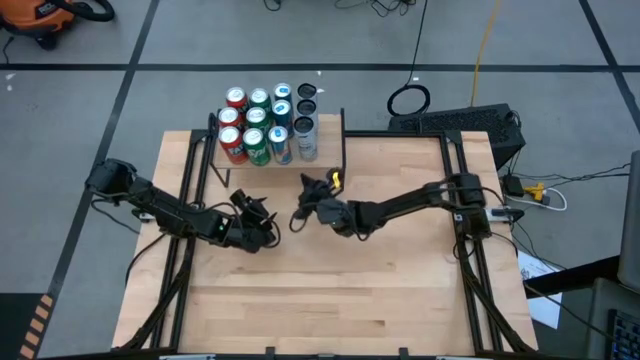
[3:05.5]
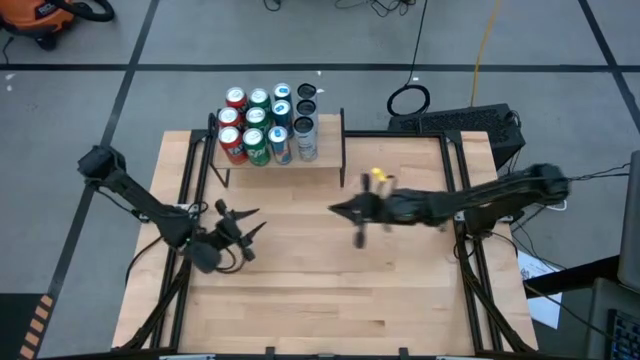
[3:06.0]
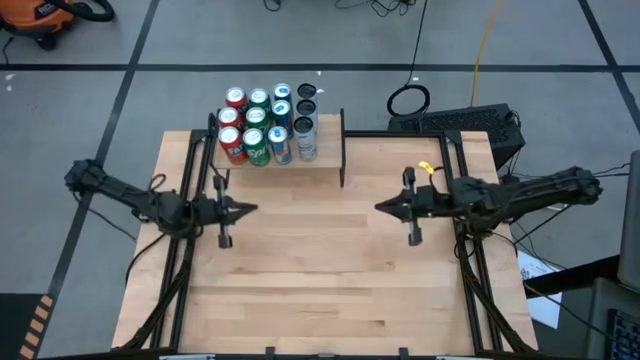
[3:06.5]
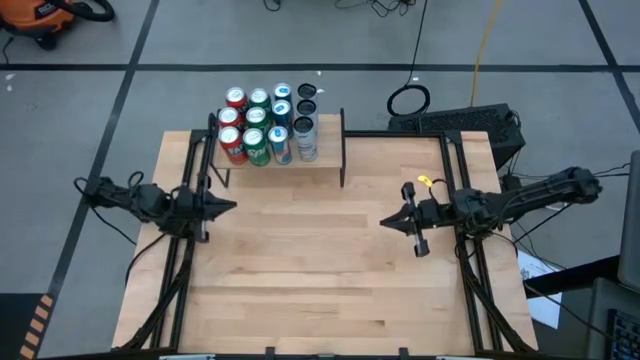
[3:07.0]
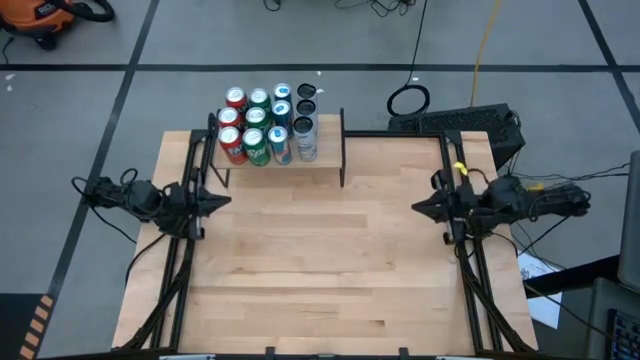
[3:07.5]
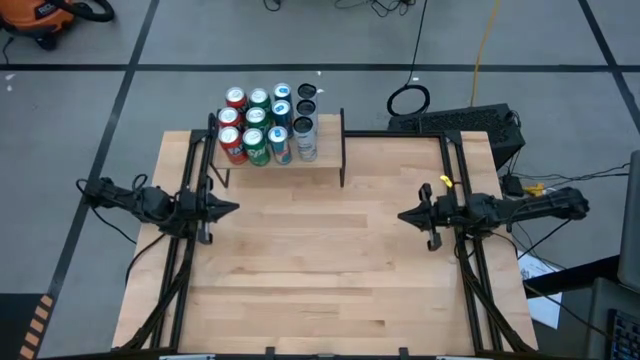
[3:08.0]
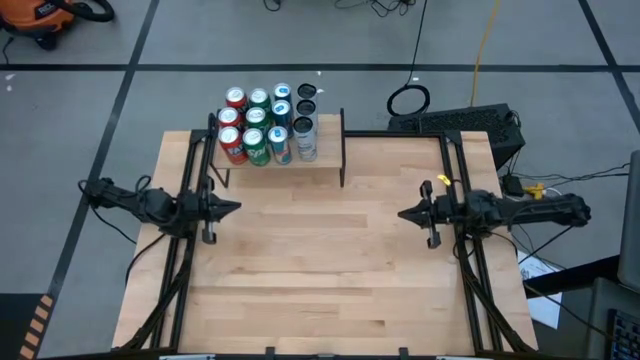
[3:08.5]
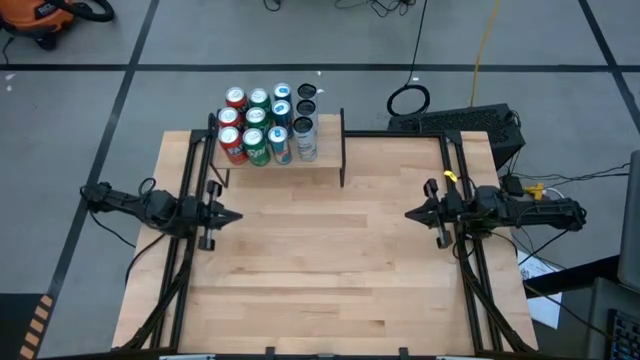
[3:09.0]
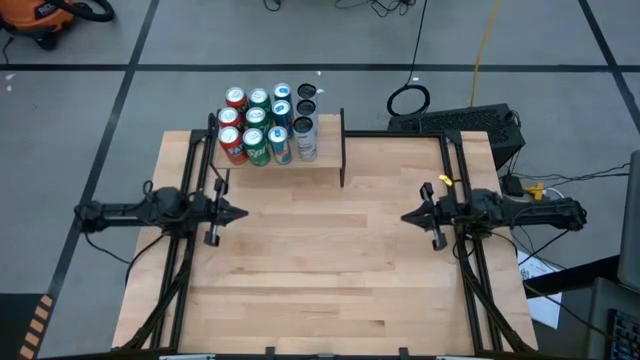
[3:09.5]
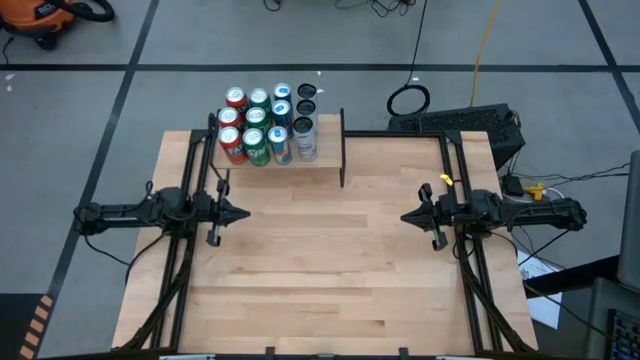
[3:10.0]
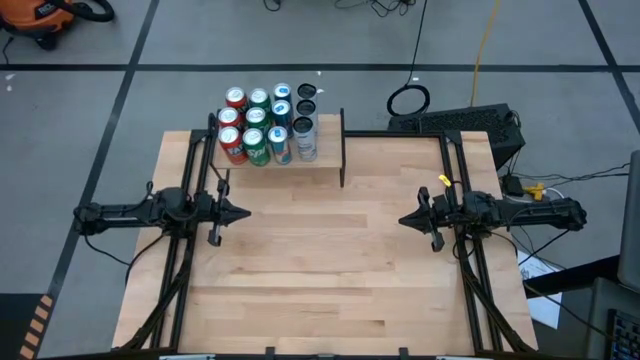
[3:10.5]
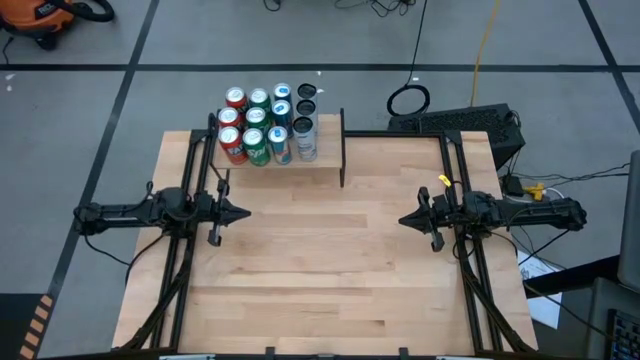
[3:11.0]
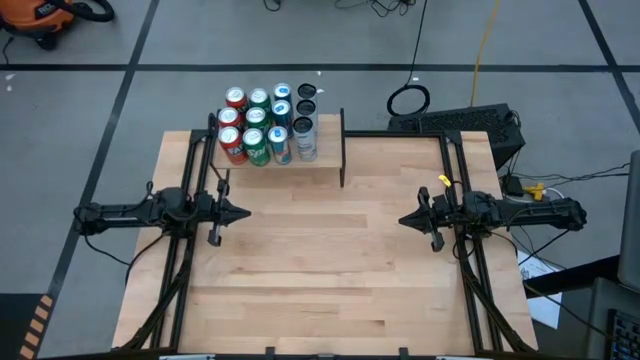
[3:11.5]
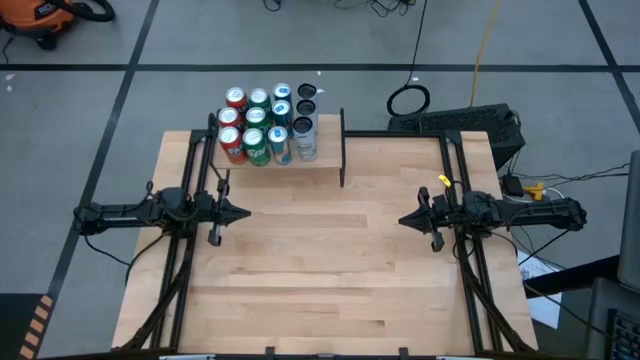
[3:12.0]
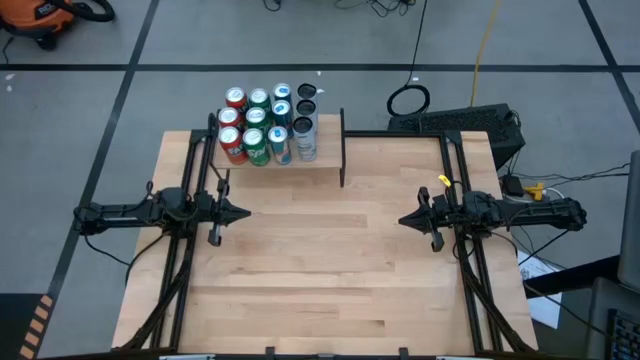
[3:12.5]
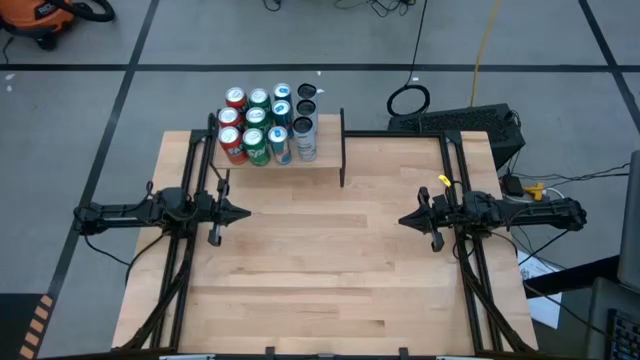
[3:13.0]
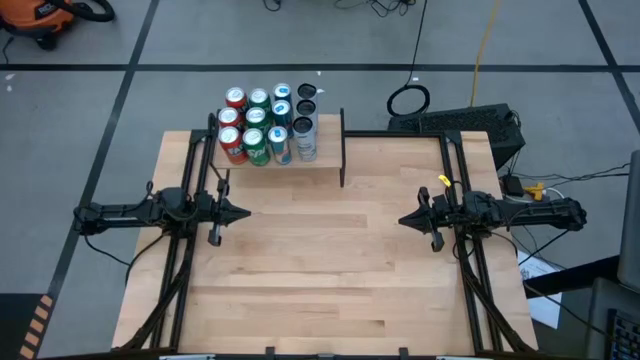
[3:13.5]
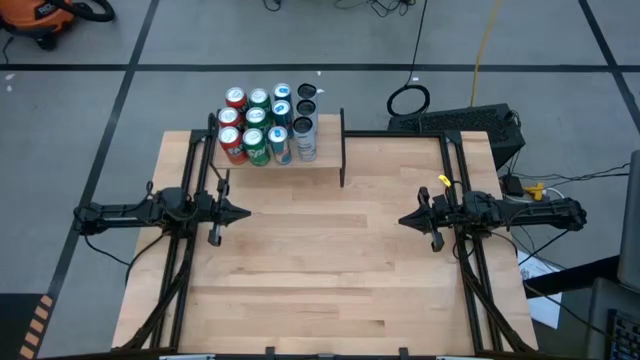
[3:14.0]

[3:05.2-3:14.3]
Task: Place canned beverage on shelf
Return to Home Position

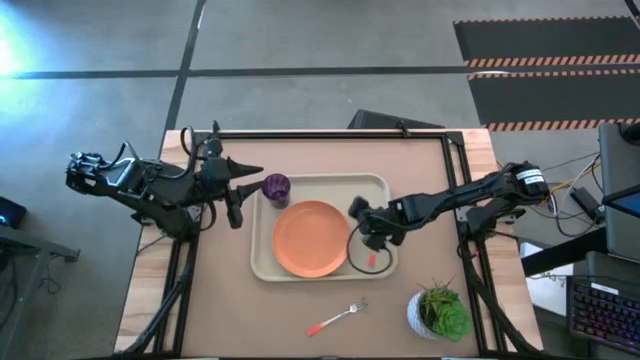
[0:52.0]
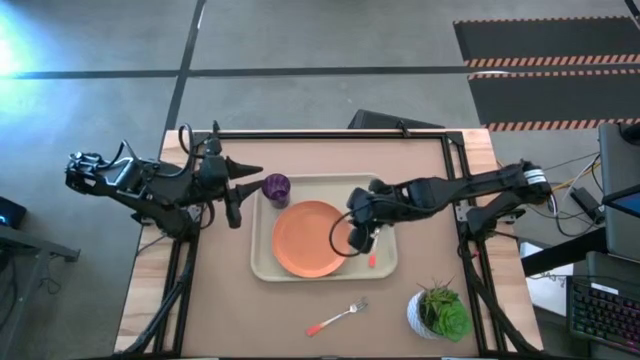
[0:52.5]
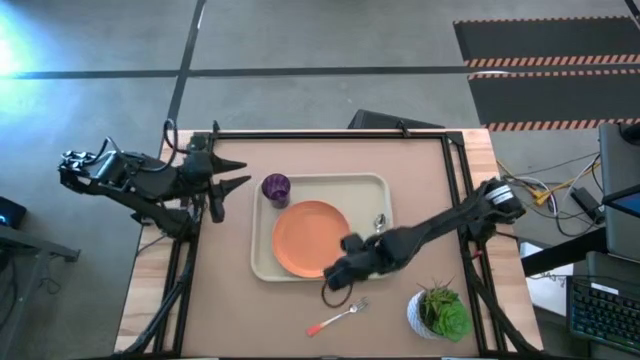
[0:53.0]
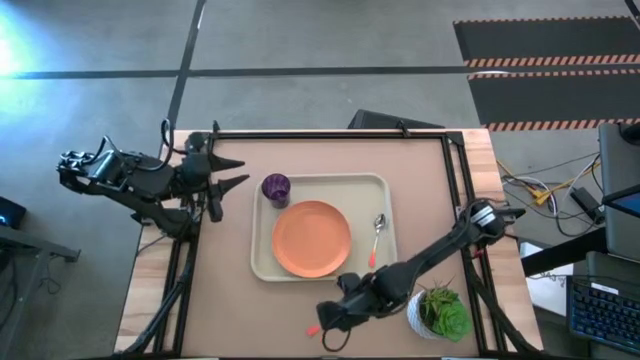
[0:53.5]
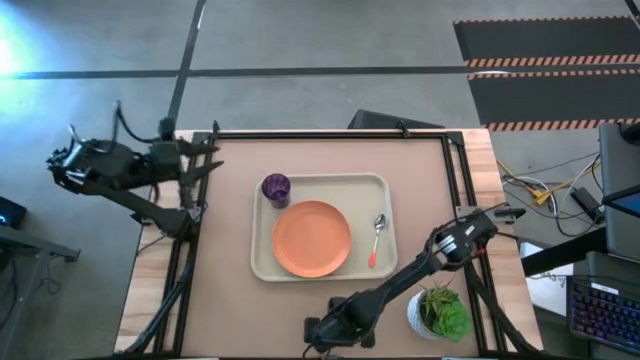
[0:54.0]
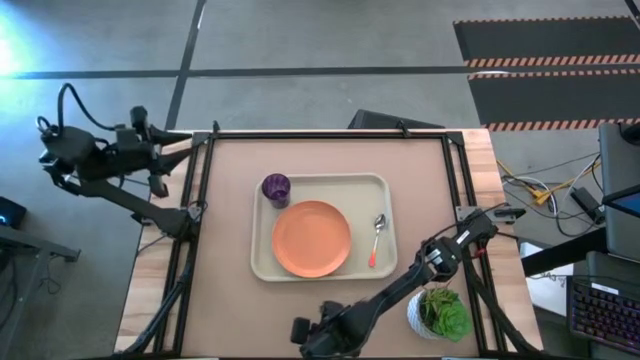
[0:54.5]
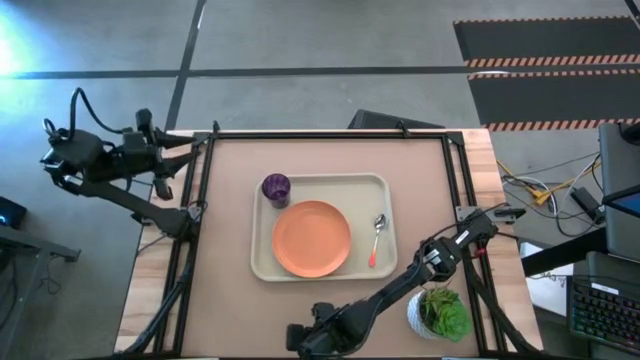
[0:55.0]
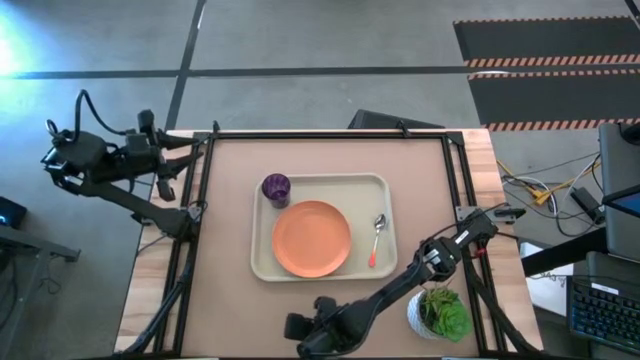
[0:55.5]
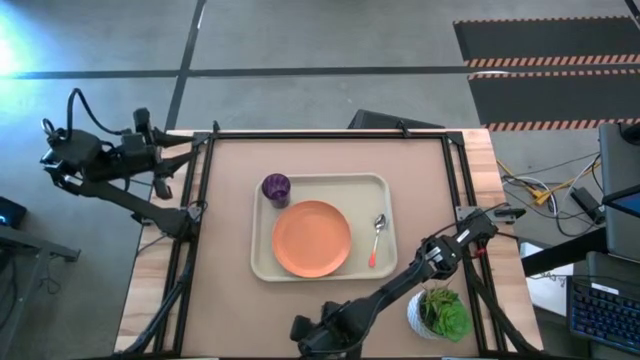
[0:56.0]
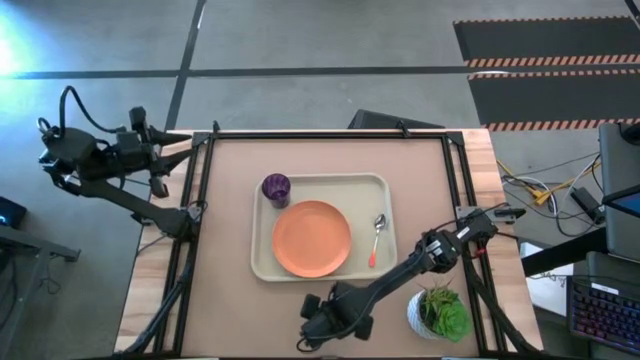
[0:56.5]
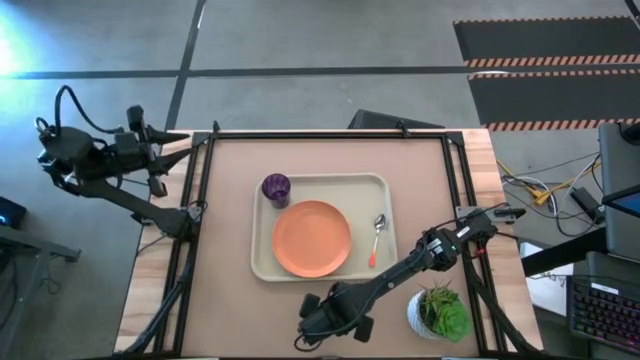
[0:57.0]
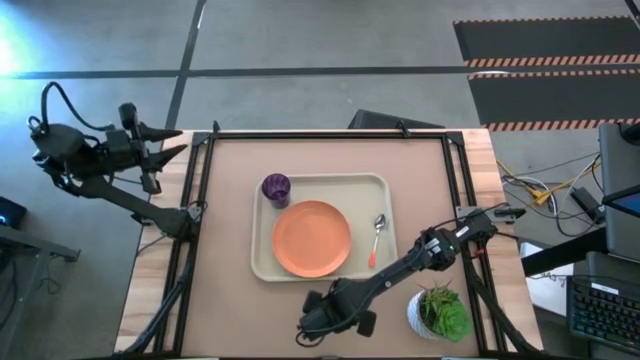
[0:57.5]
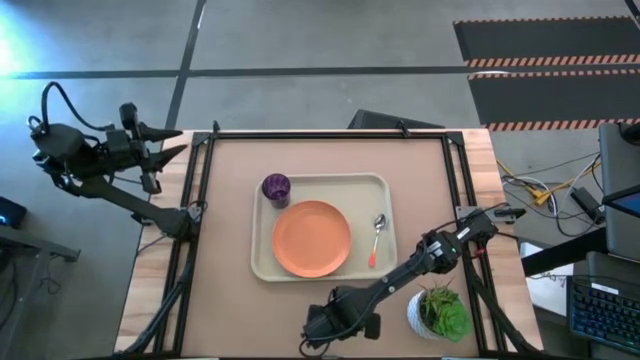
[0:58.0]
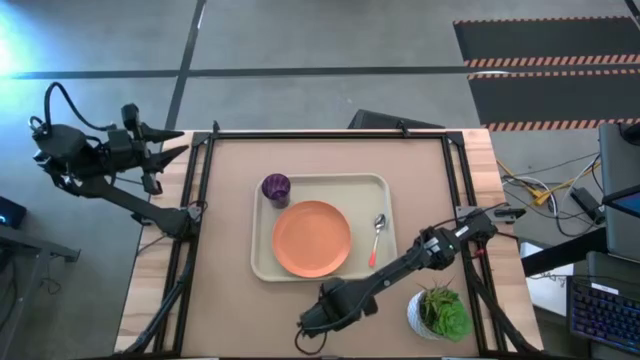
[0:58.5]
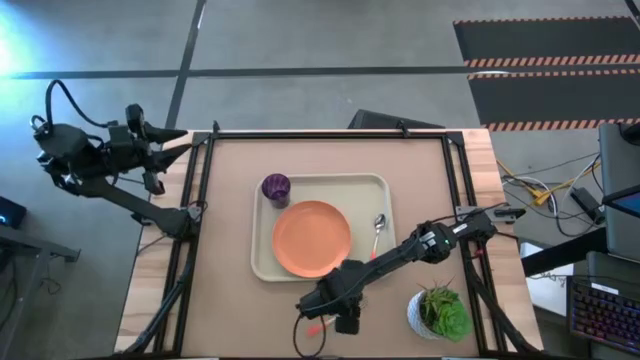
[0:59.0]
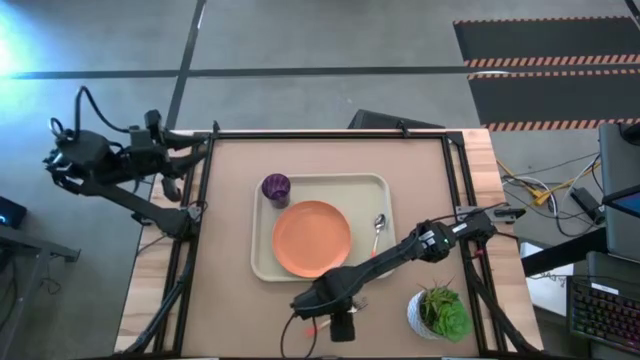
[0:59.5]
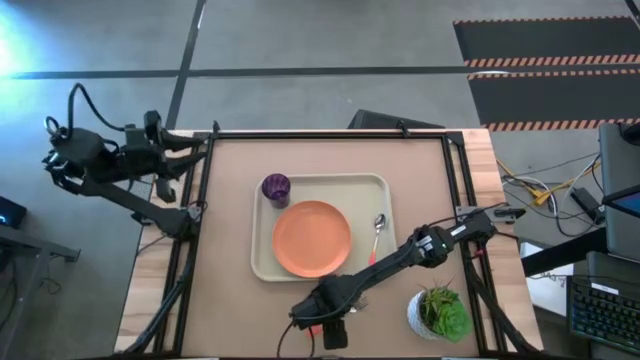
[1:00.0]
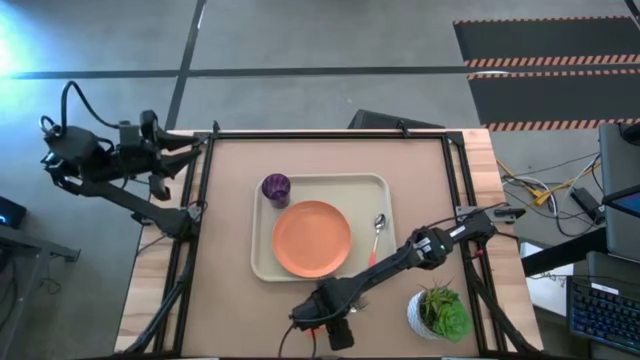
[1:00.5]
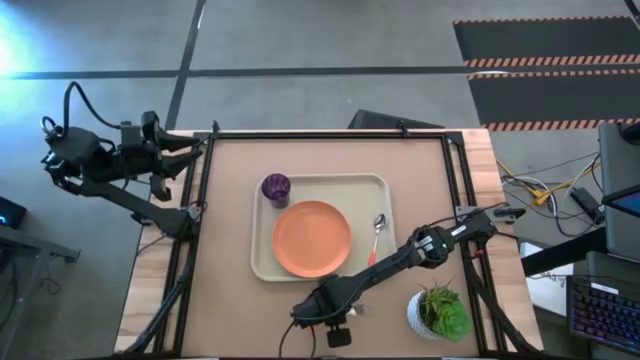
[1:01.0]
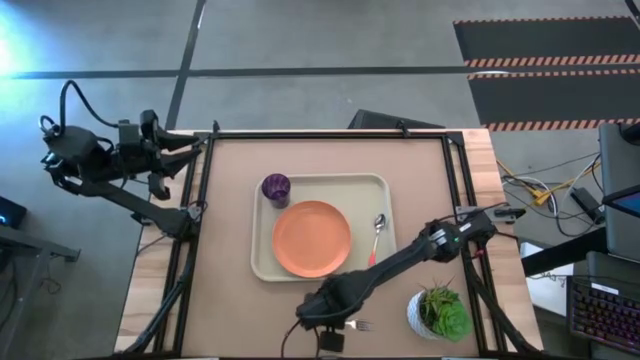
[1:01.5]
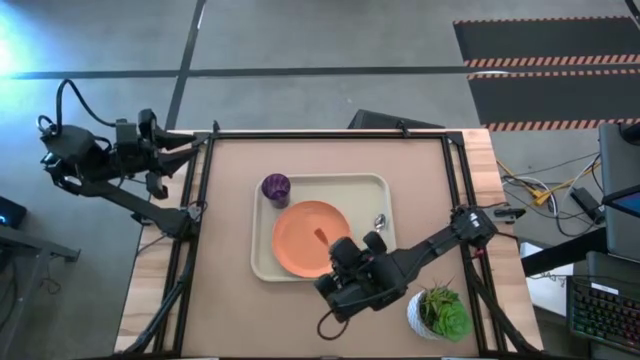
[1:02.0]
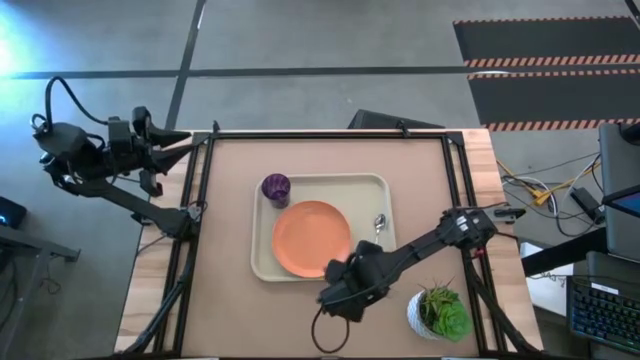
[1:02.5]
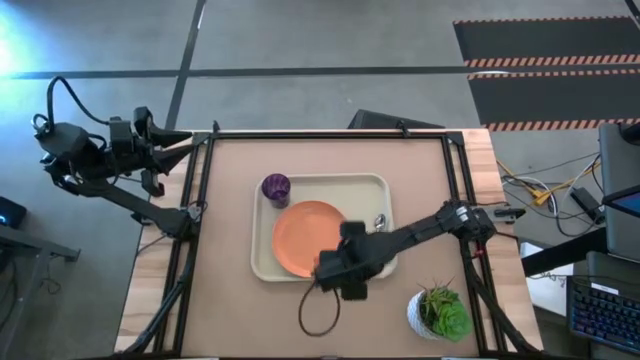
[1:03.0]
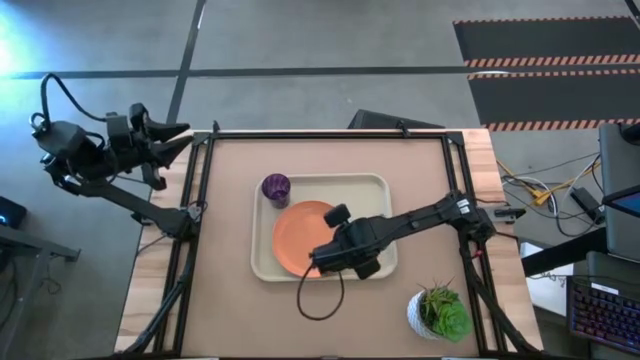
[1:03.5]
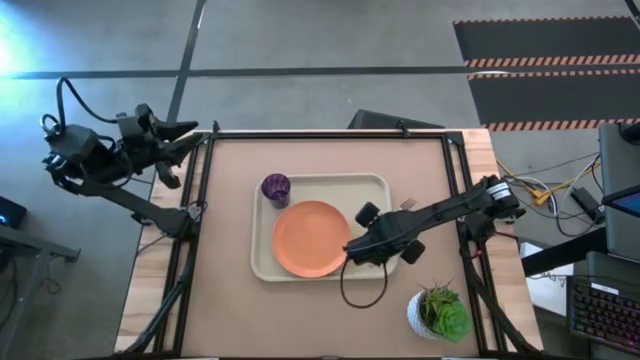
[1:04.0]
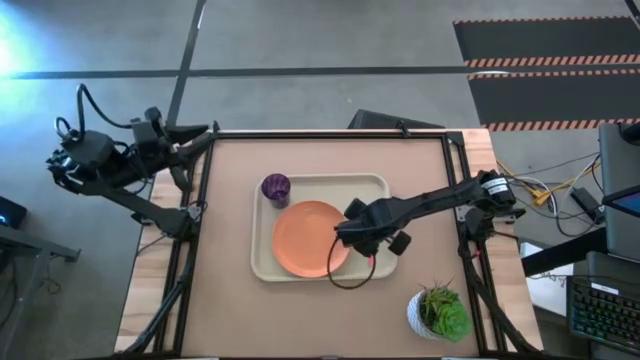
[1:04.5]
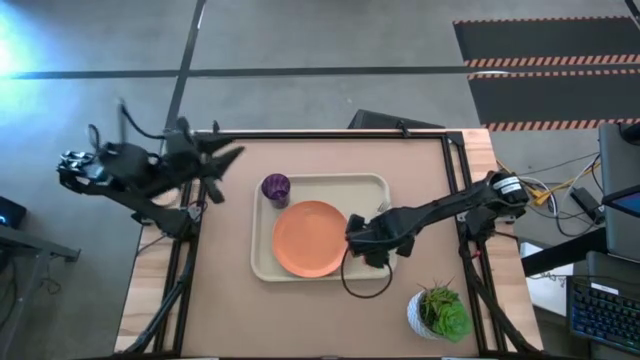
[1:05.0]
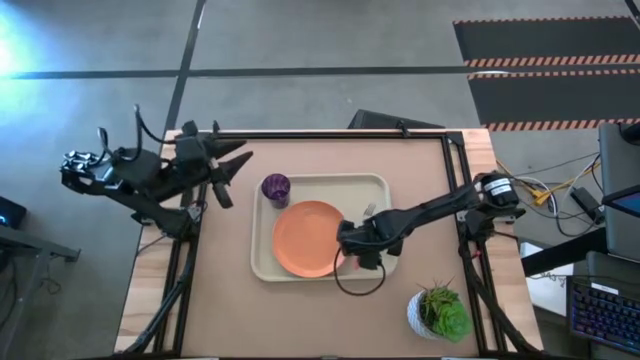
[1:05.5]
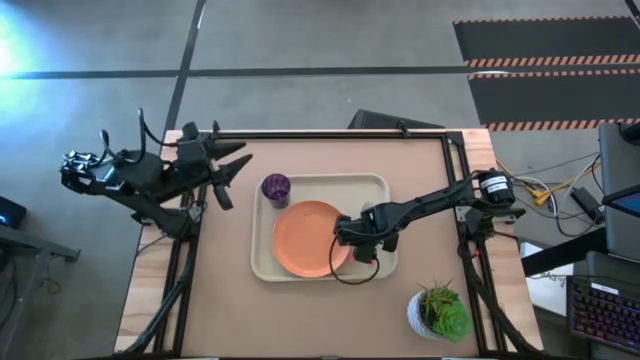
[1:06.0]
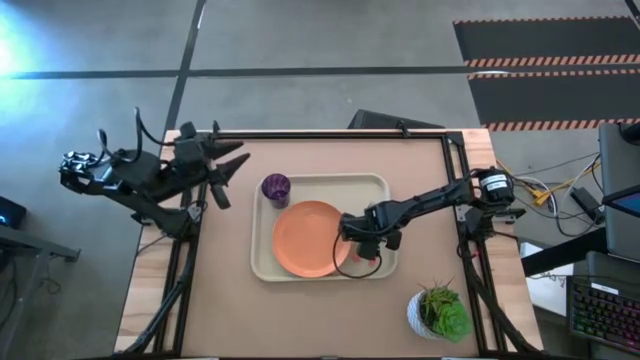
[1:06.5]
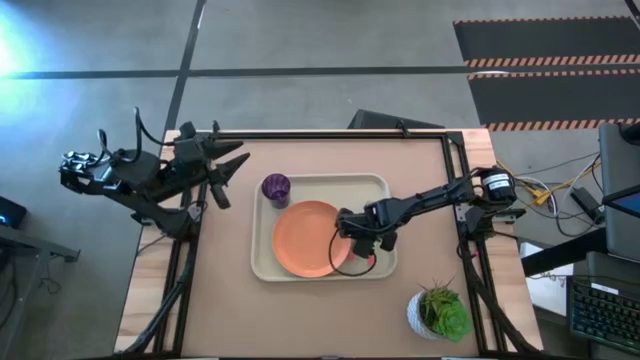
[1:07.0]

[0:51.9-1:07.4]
Task: Pick and place plate/cup/fork/spoon on tray
Put the orange fork on the beige tray
